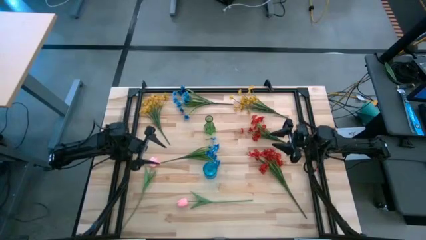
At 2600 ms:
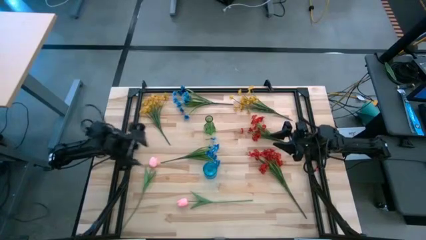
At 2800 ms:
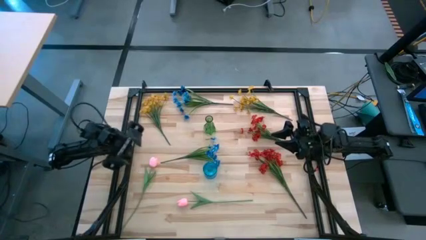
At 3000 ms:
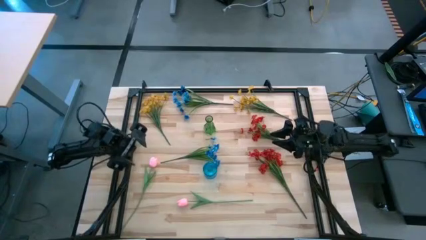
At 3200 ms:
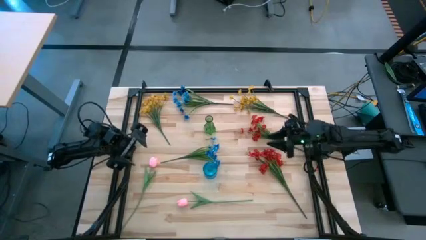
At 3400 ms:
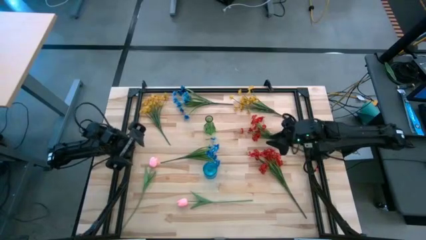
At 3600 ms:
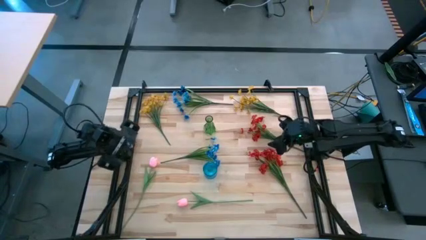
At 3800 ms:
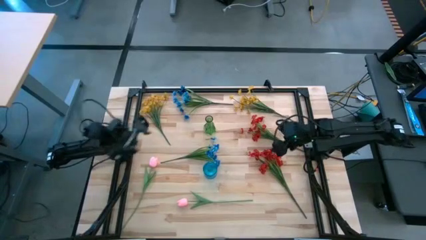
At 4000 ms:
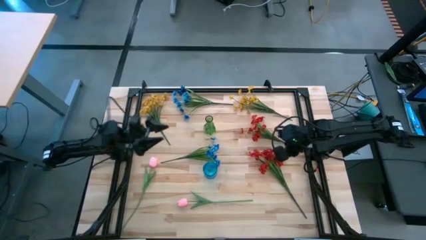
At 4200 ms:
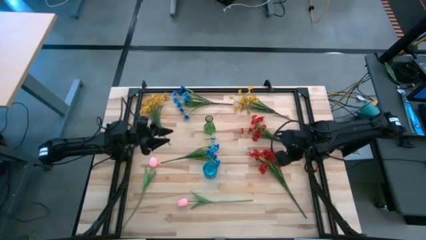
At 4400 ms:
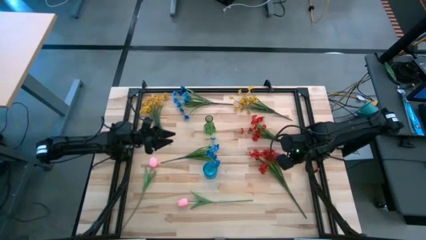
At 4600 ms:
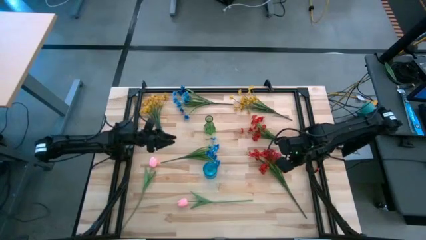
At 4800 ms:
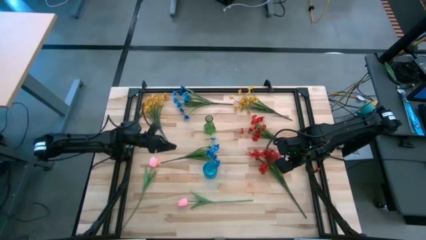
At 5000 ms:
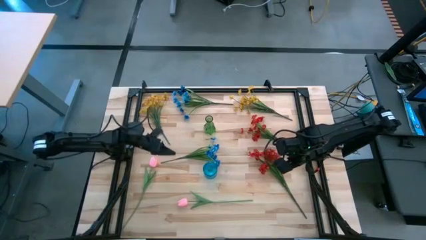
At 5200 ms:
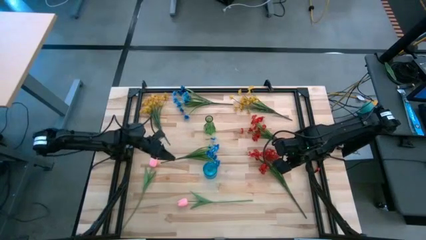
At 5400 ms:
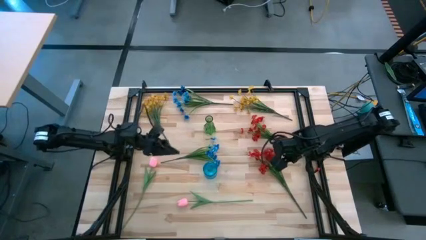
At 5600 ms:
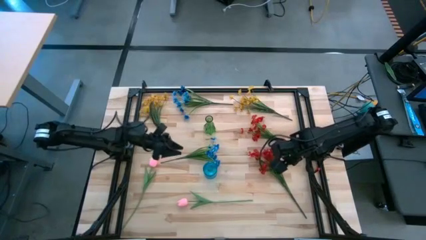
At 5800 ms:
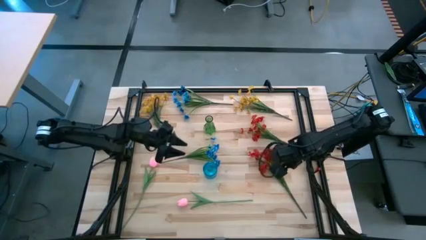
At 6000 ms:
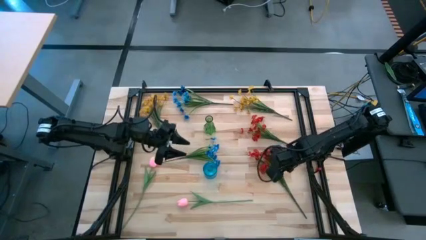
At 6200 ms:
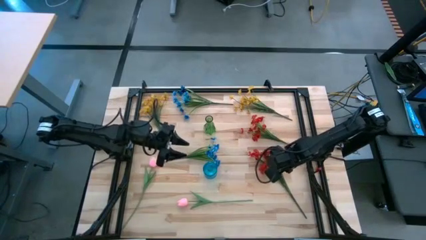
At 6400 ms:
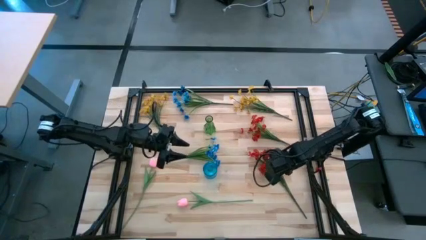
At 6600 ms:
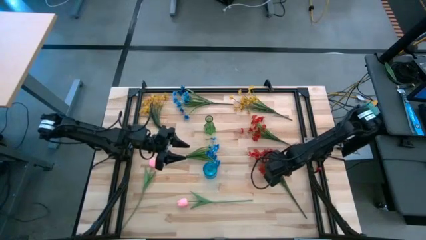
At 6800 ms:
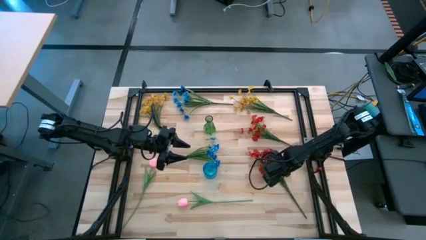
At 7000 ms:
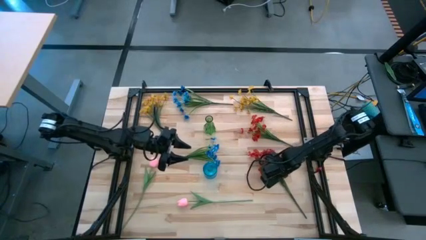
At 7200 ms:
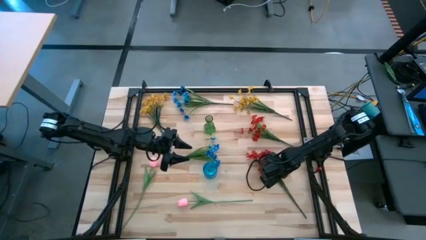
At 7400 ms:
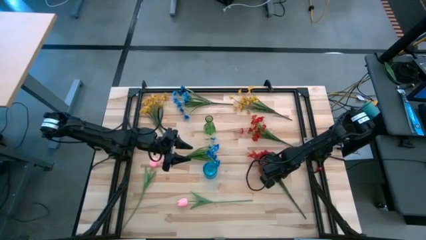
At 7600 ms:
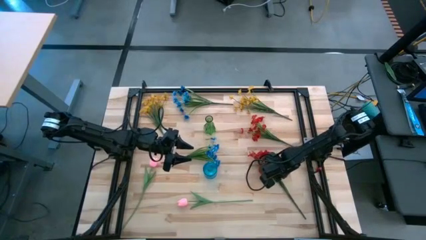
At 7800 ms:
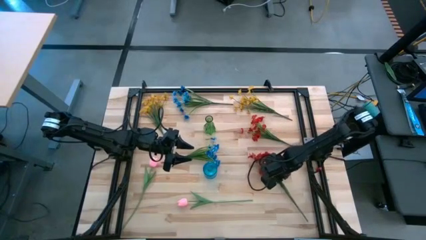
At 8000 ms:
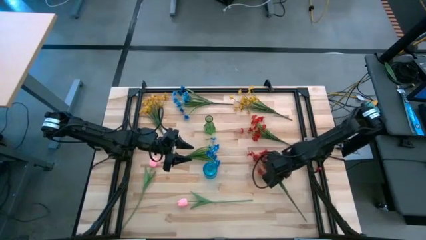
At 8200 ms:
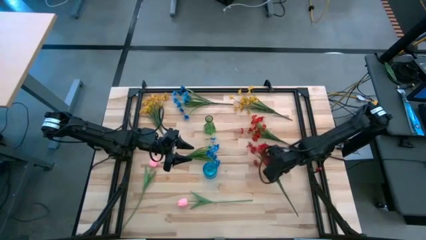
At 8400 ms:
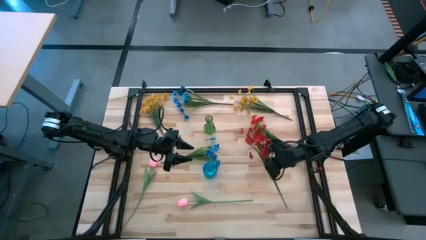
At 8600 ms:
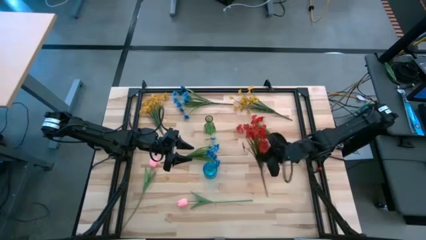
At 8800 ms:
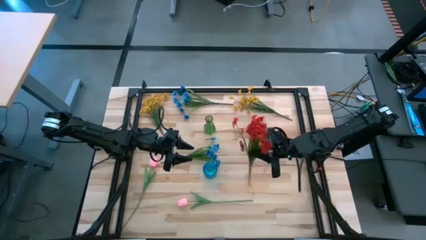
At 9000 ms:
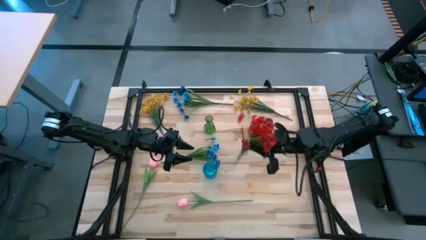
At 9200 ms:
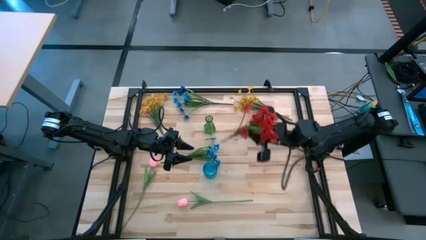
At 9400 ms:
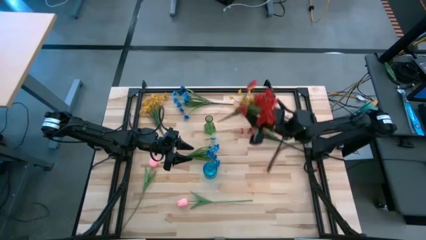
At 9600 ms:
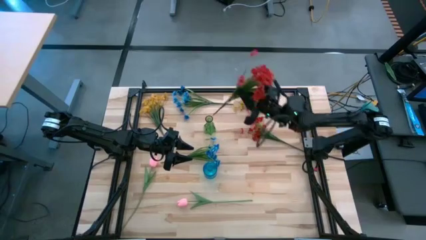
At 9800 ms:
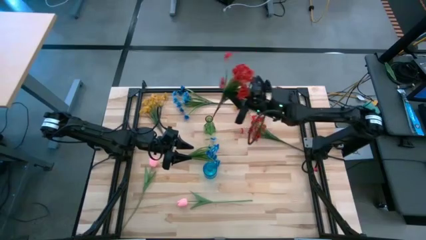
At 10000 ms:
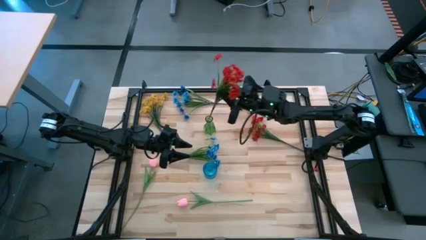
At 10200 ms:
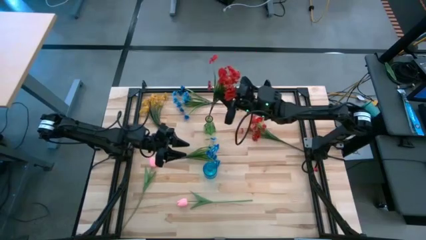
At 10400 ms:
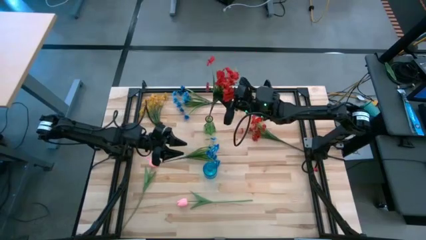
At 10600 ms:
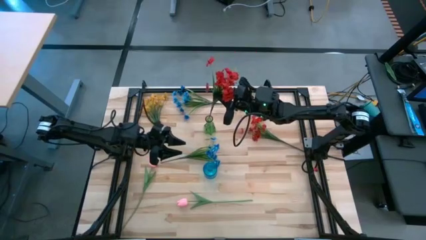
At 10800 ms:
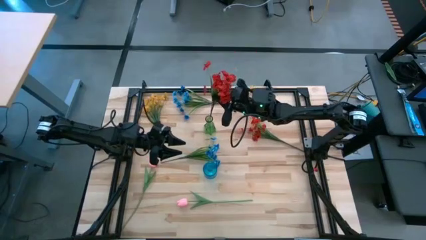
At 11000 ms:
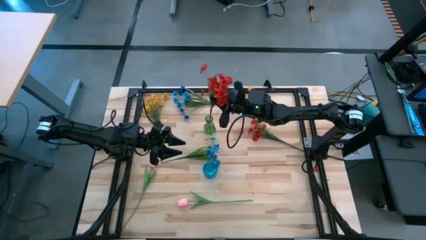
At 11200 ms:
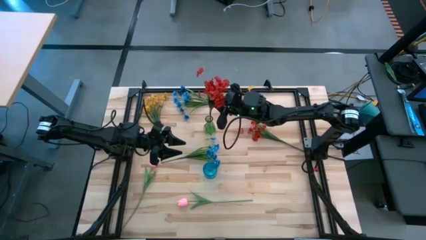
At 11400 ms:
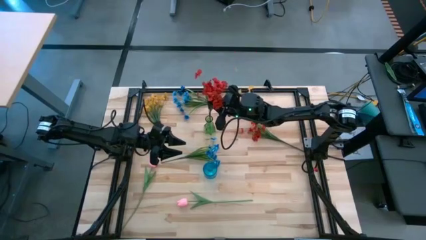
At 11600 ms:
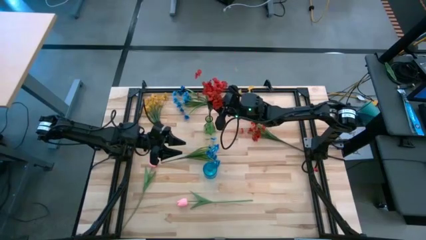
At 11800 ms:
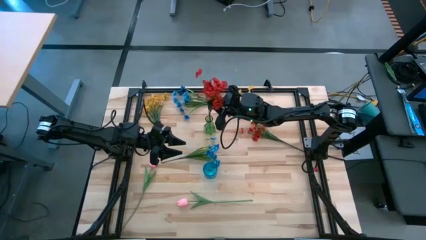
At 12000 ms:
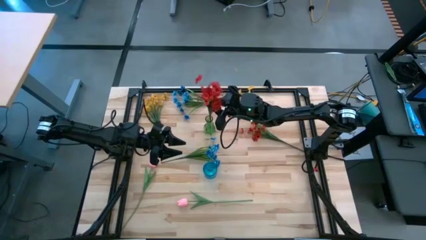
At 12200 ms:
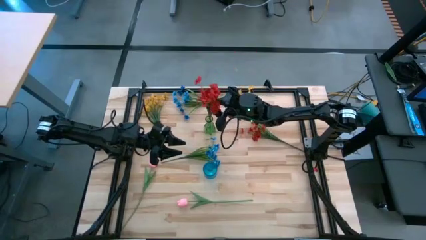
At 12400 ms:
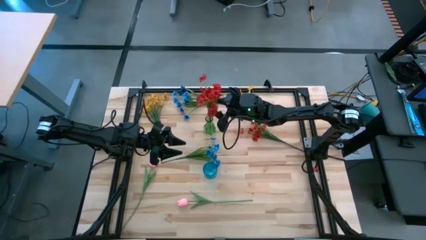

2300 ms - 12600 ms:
Task: Sort flowers into vase by color
Put the bottom red flowers into the green vase

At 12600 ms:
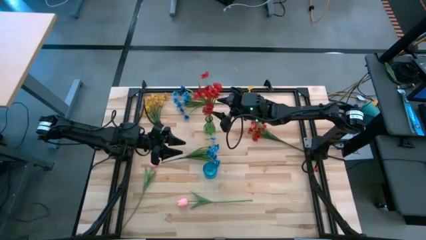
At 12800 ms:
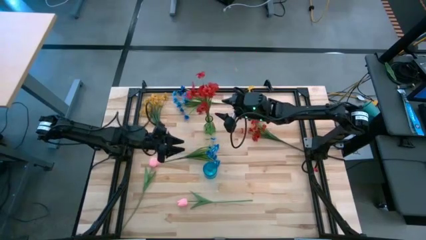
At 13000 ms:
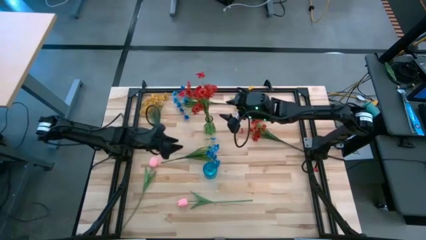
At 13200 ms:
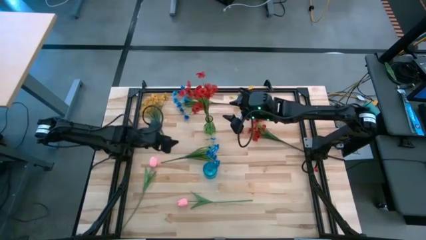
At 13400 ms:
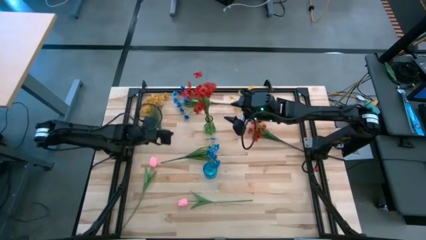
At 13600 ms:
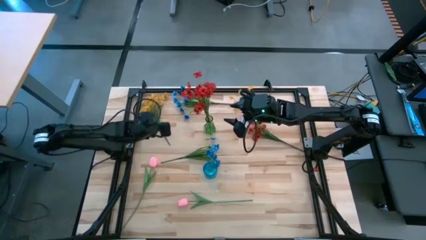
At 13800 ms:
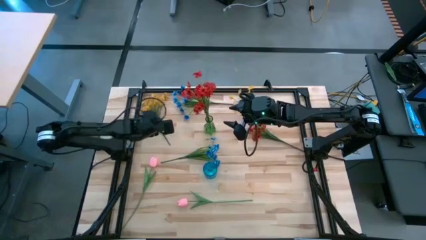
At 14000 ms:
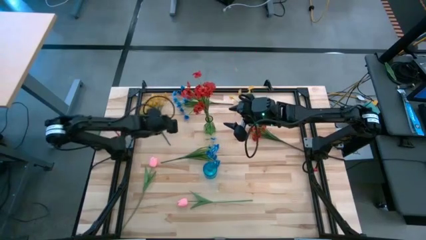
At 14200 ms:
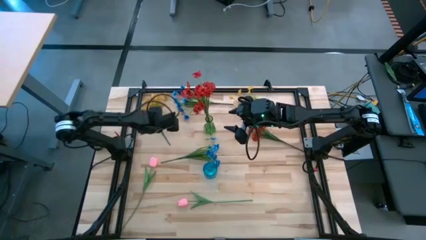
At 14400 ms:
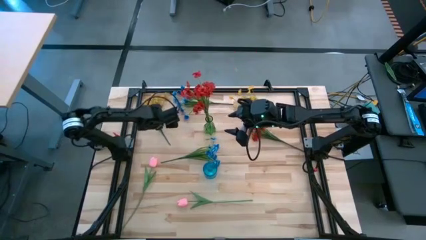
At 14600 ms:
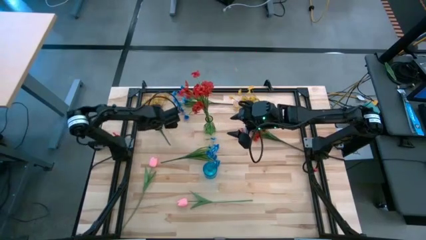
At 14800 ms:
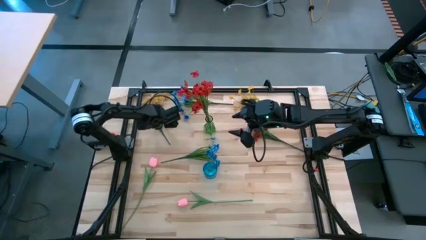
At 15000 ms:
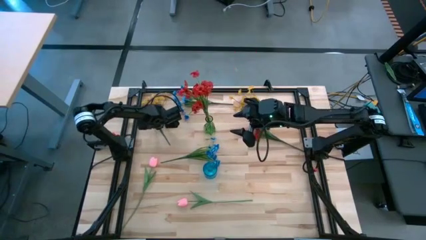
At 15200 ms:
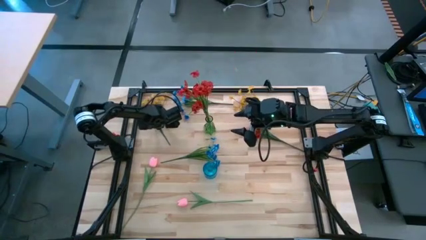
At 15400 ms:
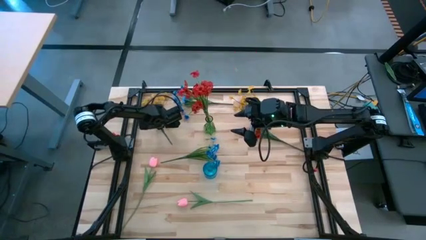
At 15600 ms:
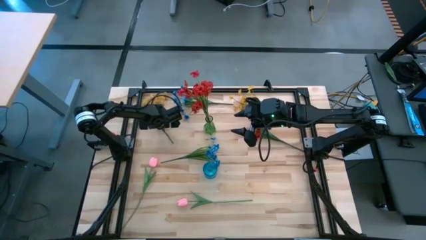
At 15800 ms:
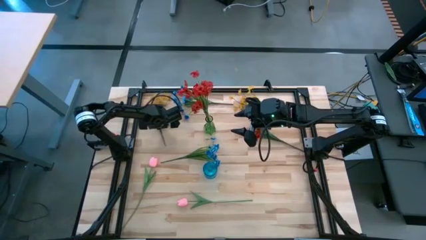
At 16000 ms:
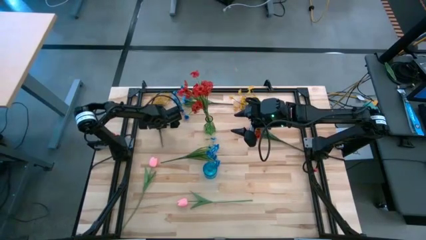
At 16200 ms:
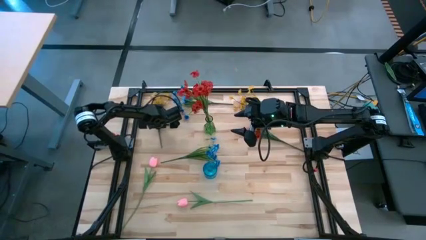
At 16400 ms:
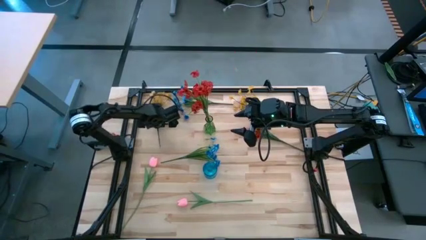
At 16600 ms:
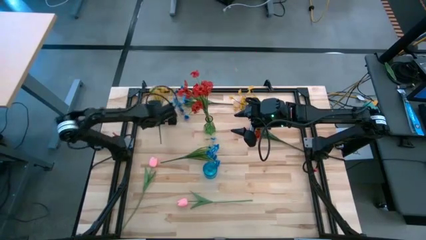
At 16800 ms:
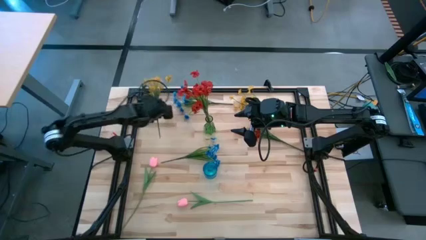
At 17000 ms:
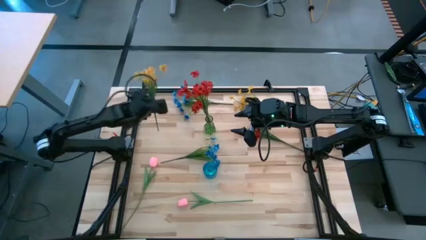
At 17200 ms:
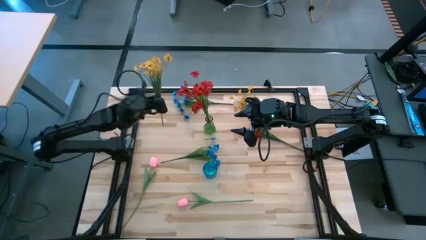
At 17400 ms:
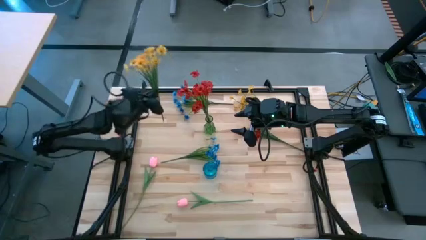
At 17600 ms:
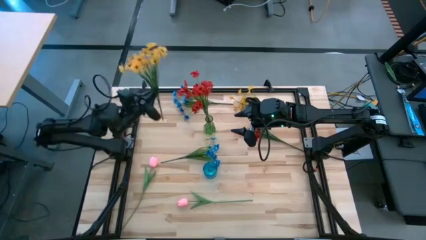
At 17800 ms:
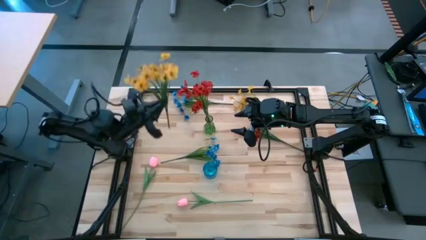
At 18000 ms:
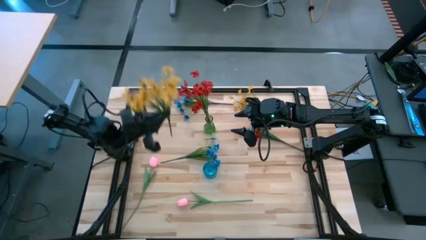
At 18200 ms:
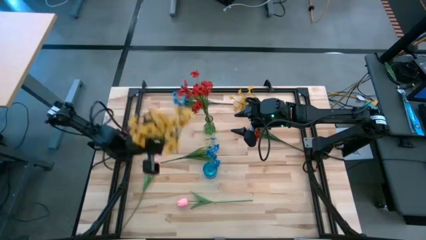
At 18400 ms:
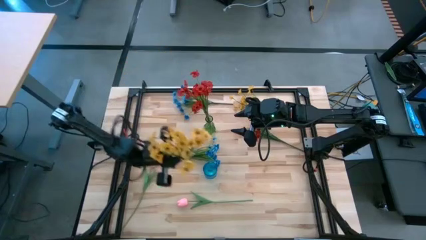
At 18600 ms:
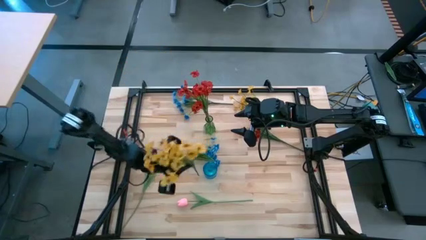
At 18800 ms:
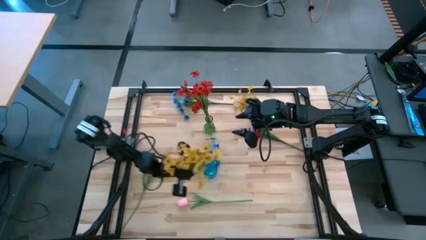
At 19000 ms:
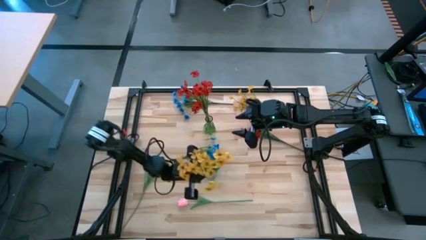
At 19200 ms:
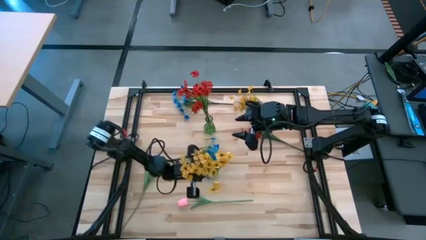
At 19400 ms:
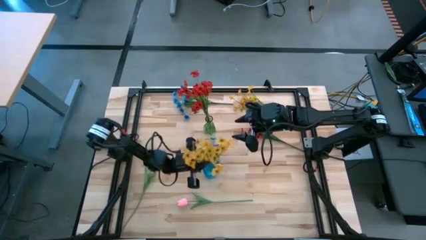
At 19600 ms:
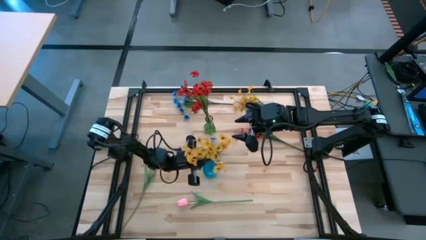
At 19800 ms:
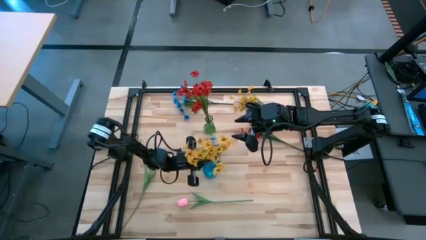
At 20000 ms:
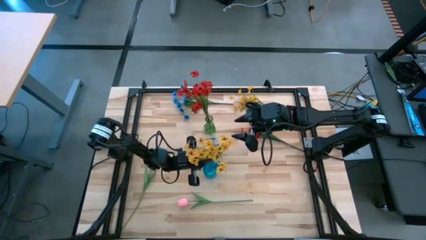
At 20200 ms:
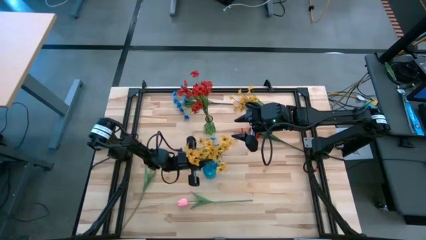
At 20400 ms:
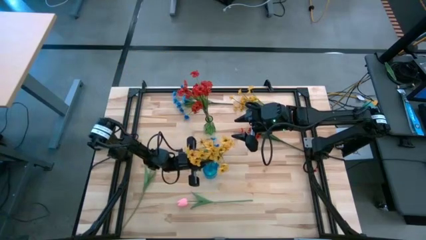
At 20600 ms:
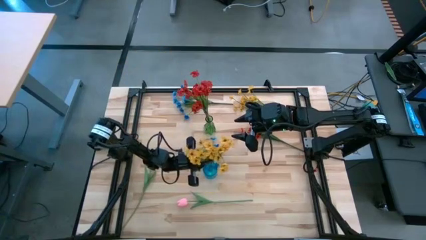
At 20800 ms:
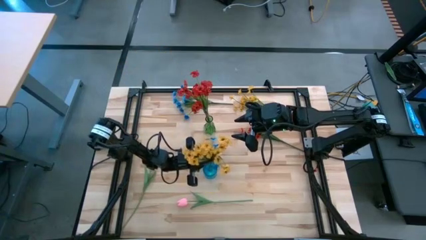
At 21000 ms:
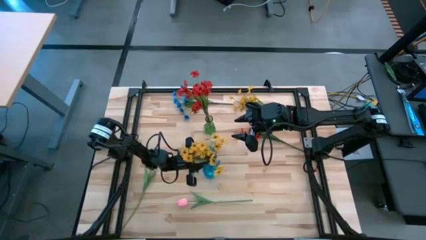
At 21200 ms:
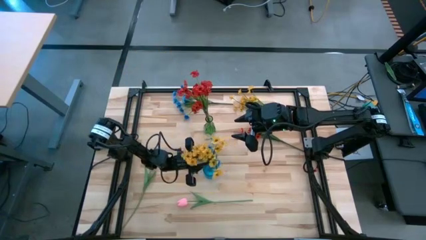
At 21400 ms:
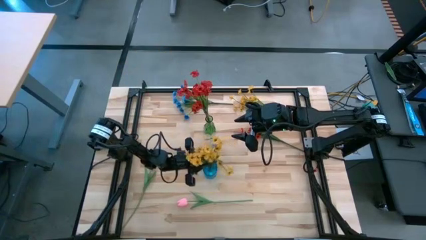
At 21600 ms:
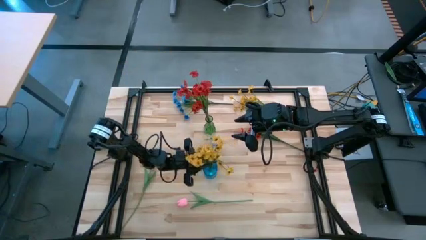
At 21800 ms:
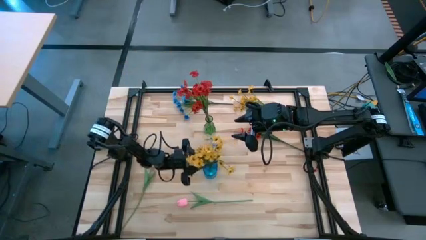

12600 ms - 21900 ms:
Put the left yellow flowers into the blue vase
